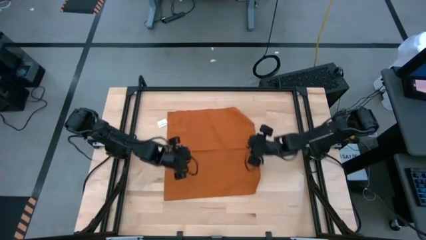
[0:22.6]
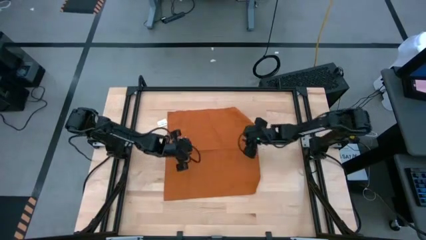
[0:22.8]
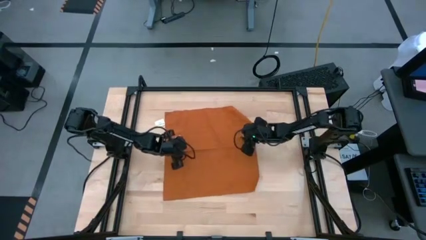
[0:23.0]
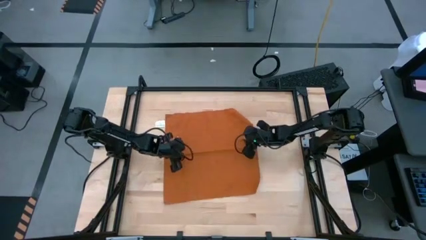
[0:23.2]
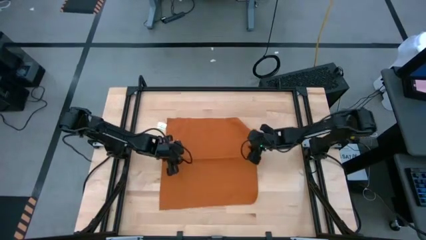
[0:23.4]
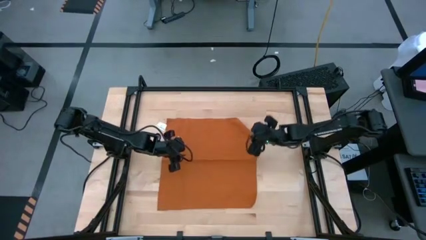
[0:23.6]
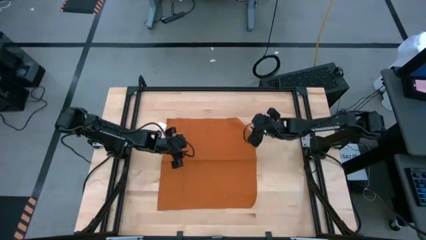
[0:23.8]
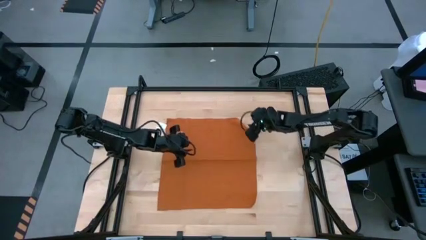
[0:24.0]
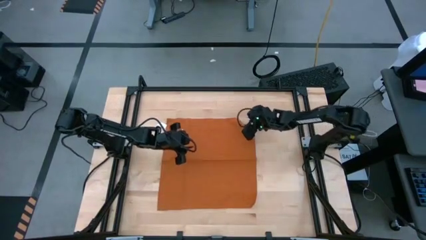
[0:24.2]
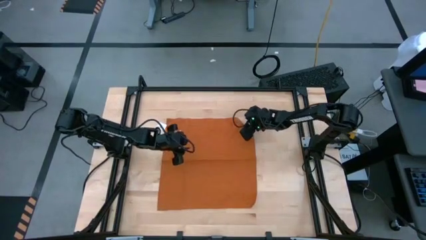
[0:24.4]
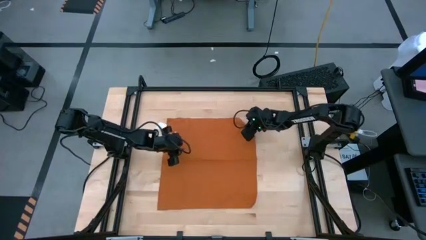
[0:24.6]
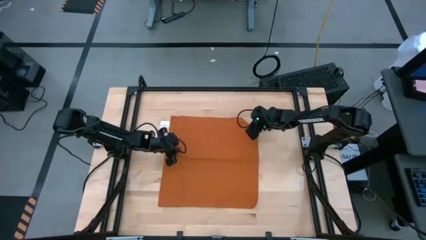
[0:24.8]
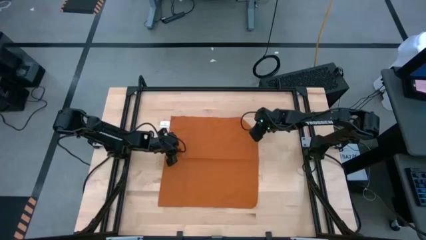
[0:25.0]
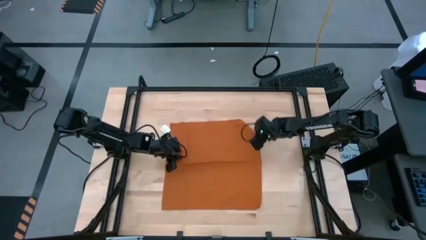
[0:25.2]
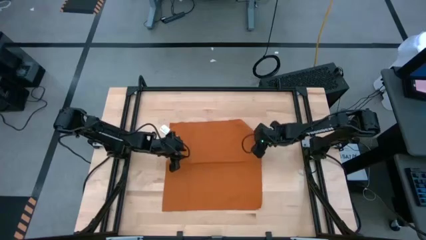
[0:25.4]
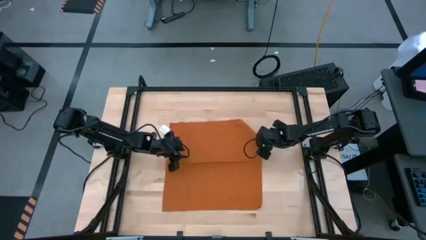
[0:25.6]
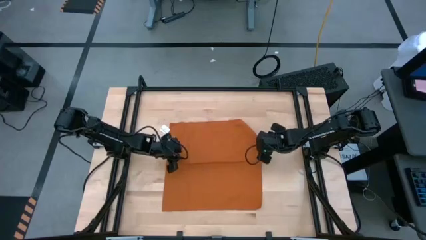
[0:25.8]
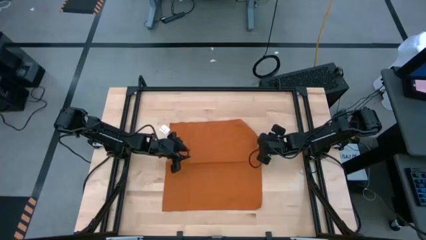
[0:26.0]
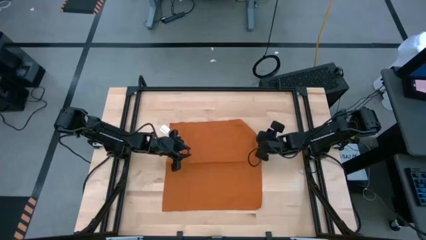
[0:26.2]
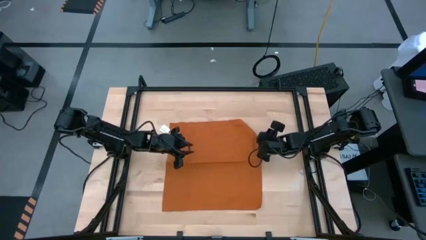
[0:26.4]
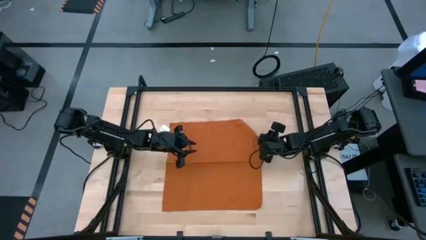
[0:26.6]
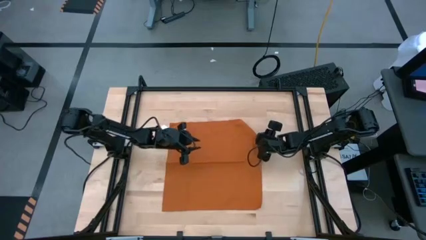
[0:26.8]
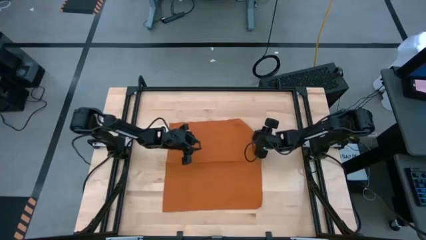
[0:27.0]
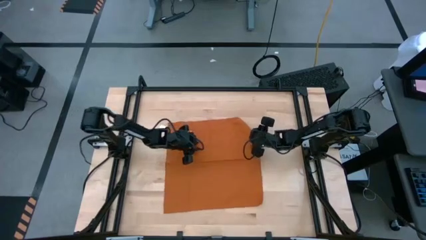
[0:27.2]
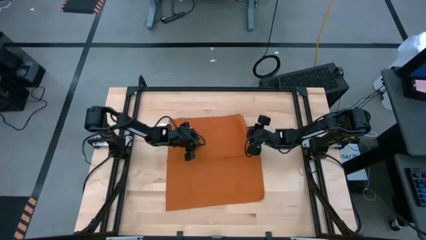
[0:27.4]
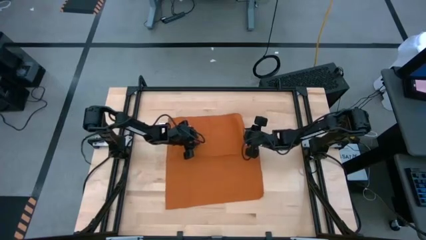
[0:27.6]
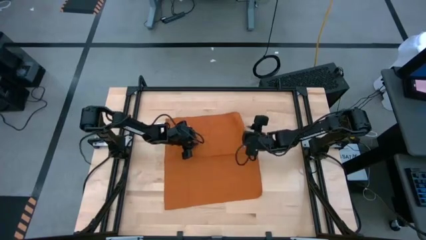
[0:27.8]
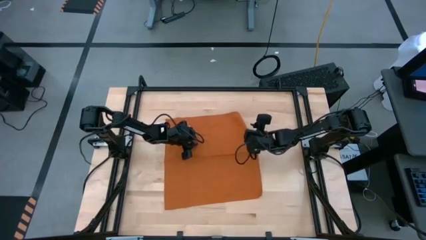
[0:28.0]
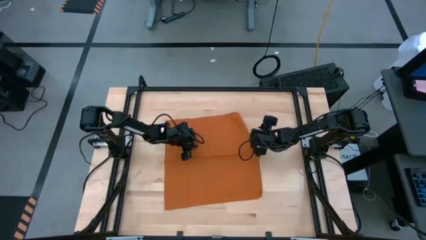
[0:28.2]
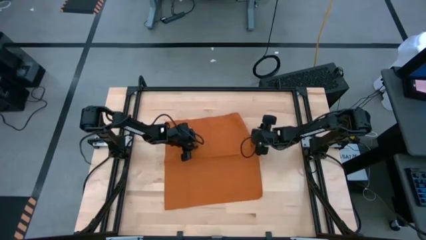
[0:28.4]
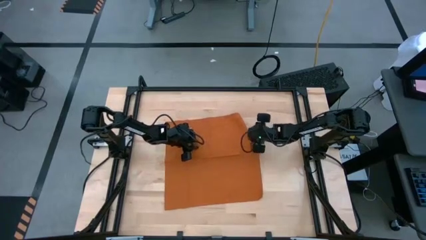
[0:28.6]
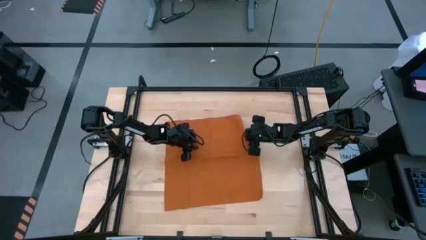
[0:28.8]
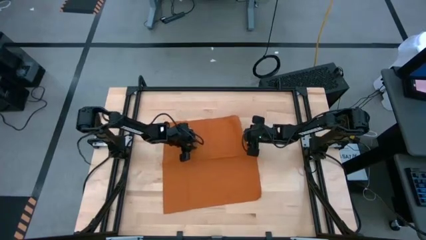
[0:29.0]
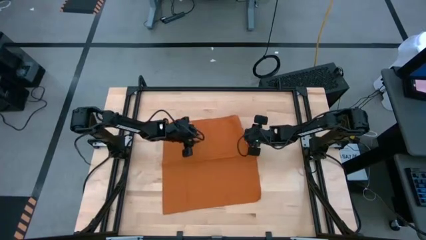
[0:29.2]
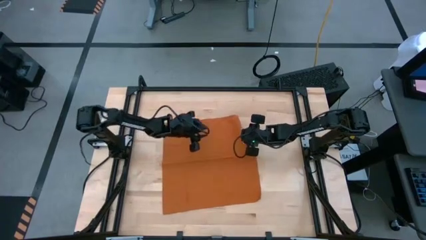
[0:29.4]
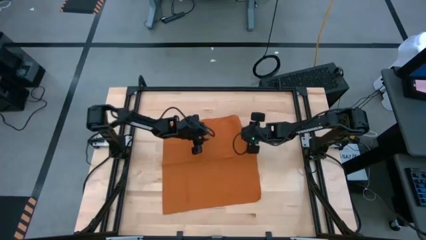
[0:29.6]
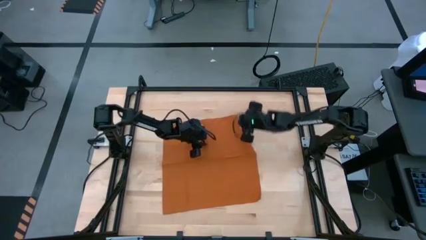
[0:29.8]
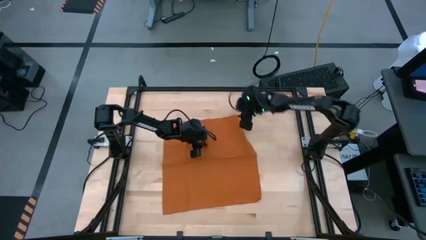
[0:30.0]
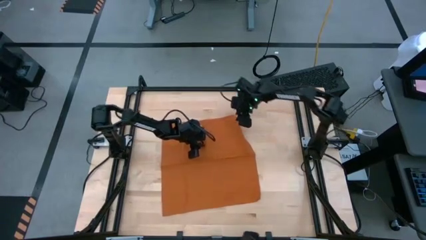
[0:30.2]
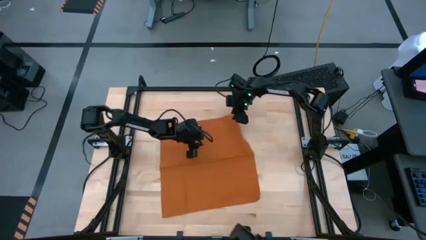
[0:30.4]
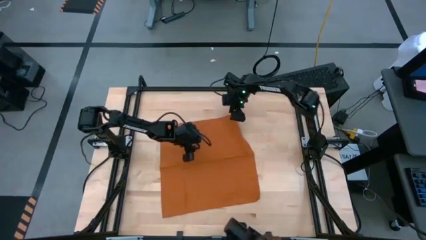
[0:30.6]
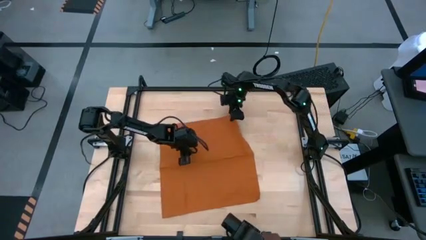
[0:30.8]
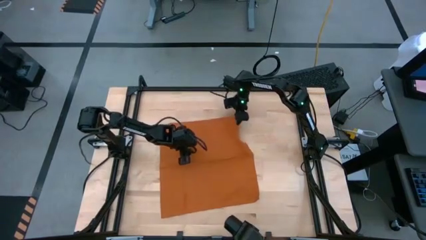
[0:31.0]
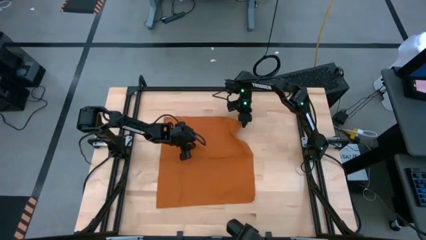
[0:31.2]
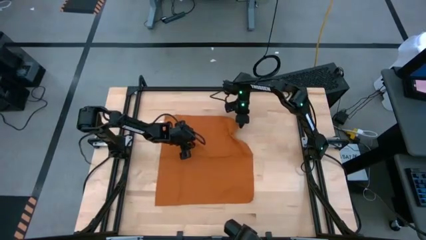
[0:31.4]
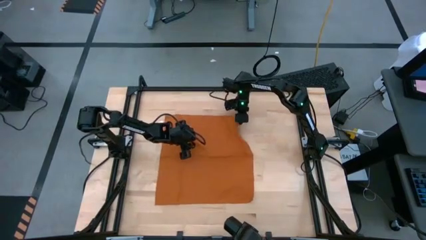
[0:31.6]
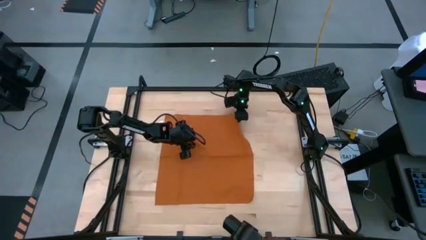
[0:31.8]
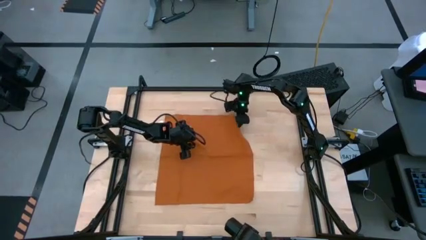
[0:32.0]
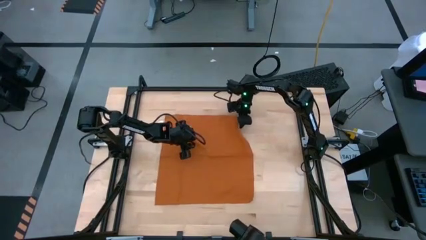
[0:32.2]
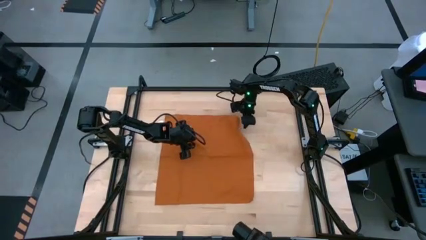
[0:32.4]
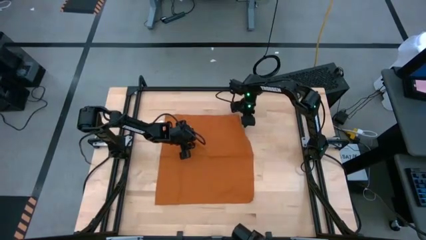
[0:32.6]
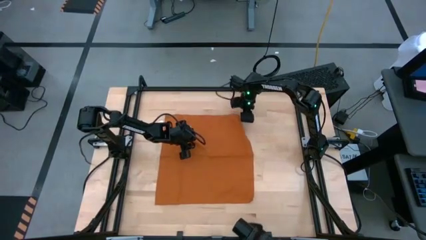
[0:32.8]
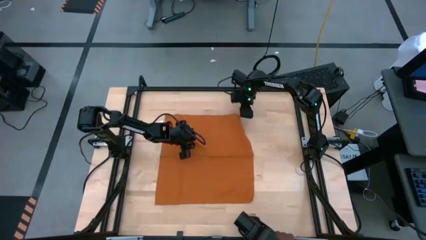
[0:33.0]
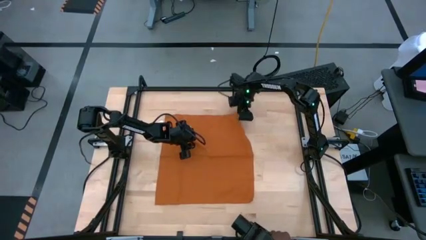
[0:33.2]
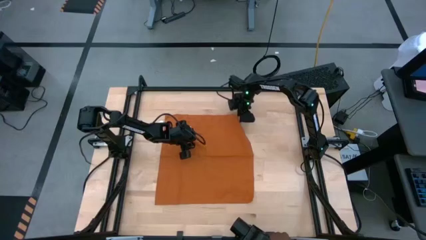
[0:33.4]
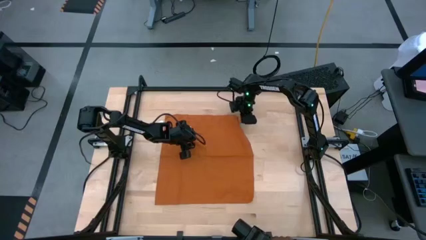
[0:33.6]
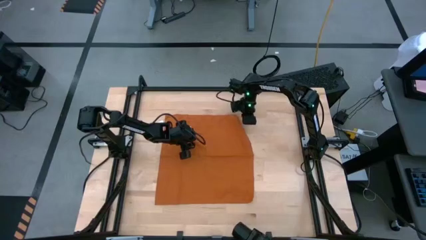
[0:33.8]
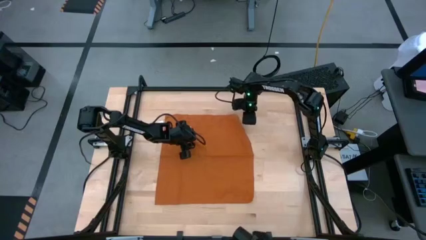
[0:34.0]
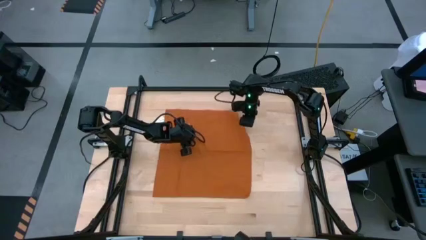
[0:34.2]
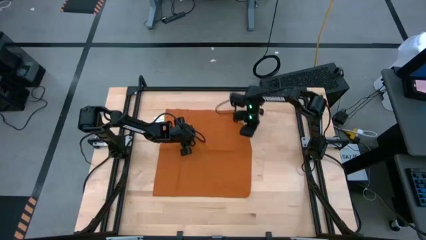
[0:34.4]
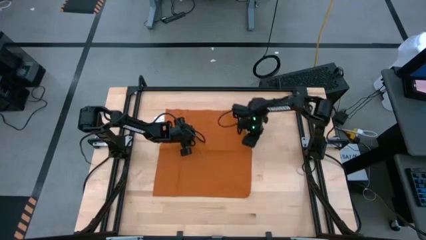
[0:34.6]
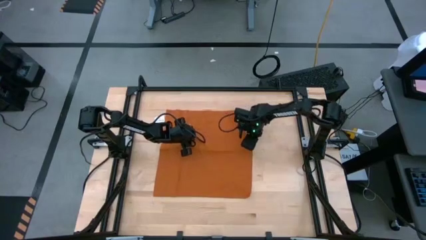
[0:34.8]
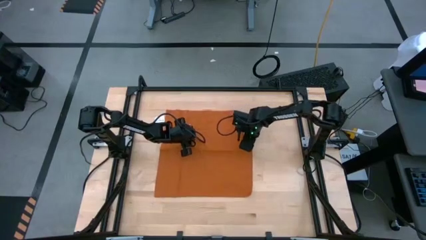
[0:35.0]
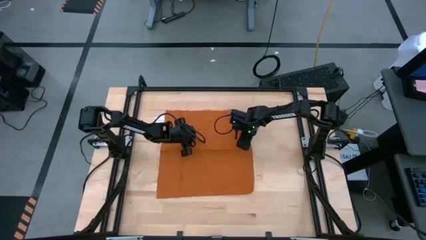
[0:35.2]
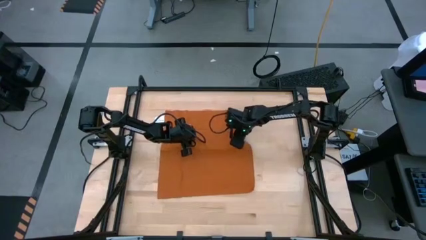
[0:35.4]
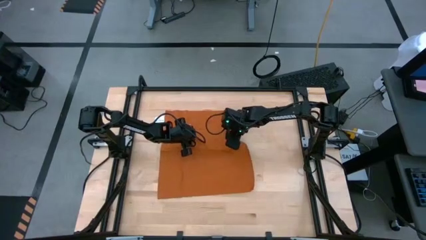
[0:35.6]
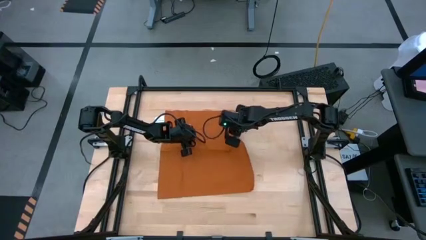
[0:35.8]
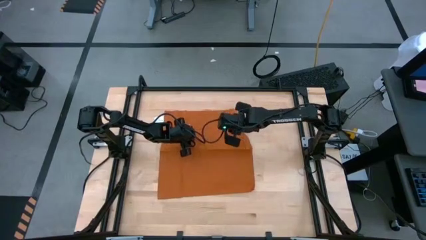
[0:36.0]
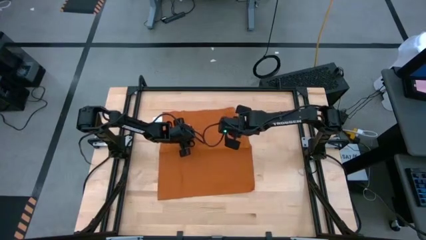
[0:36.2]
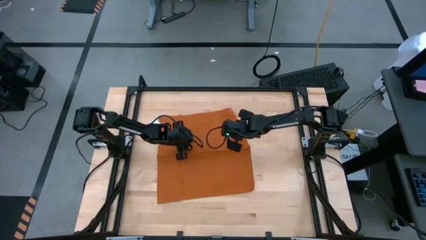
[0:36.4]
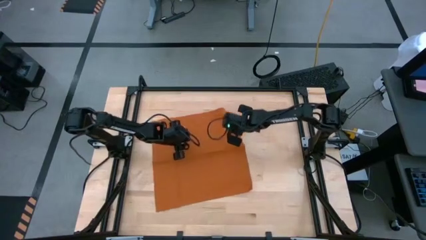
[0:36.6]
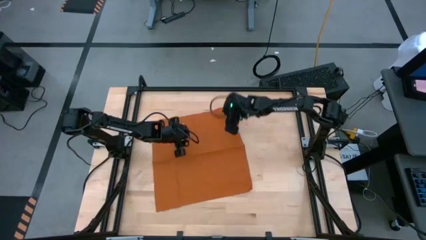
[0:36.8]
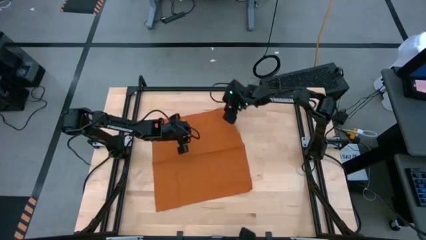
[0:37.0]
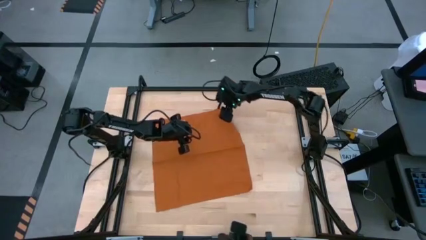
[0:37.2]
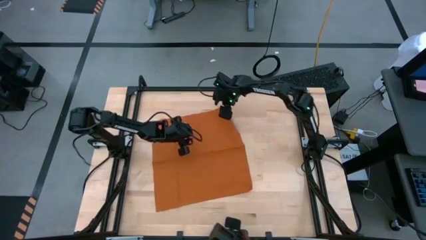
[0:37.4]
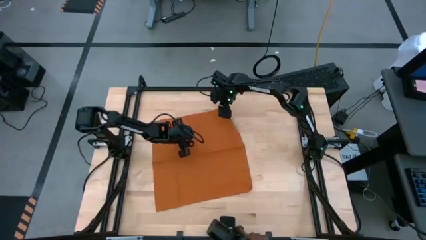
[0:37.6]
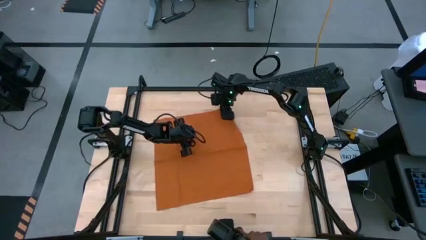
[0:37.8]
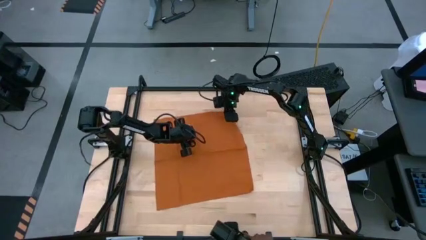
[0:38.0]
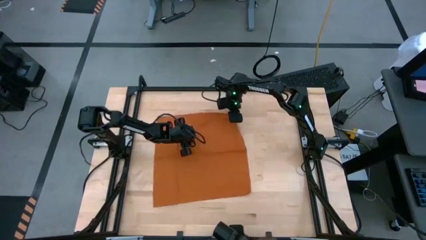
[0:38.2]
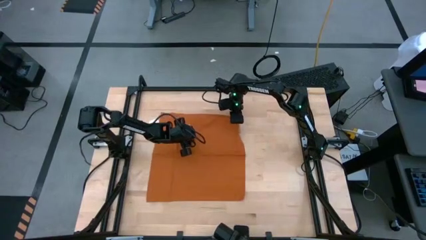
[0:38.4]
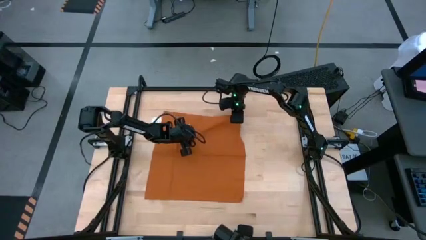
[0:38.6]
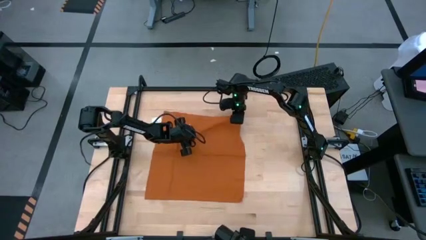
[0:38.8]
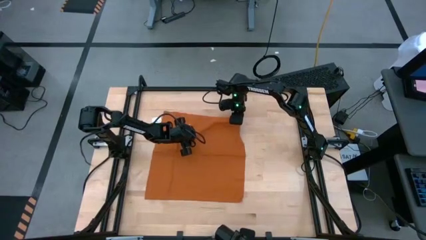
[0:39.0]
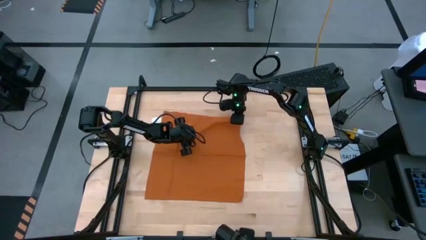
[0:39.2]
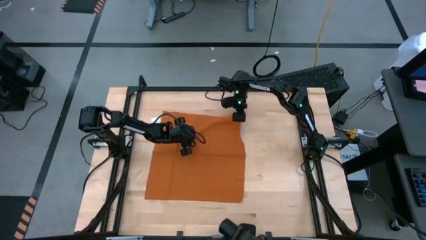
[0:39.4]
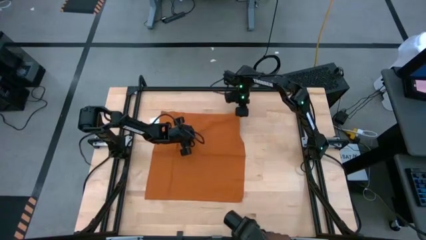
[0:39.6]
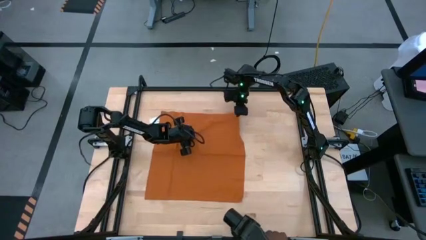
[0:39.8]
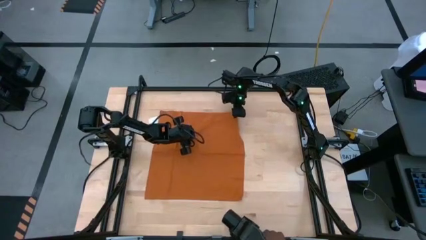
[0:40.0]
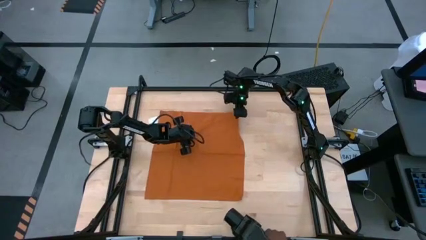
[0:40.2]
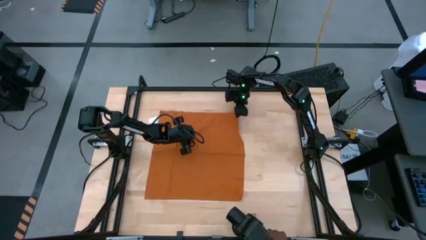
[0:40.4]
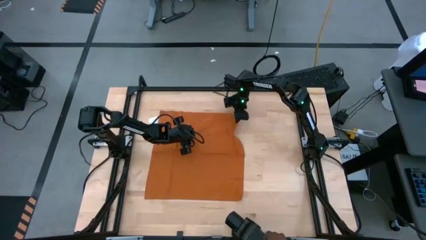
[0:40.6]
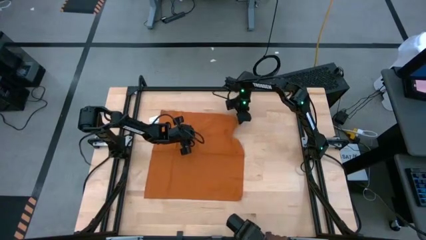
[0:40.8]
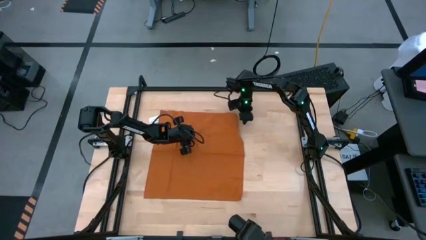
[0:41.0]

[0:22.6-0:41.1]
Task: Roll towel
Roll the brown towel
